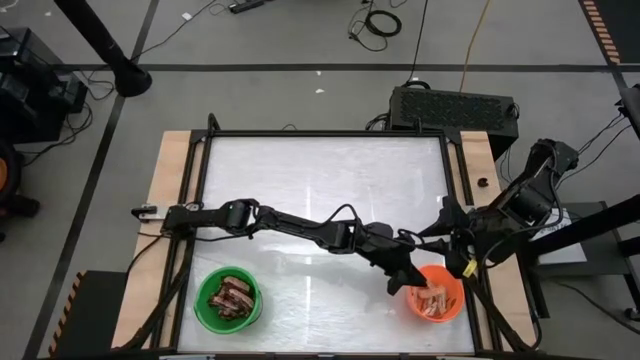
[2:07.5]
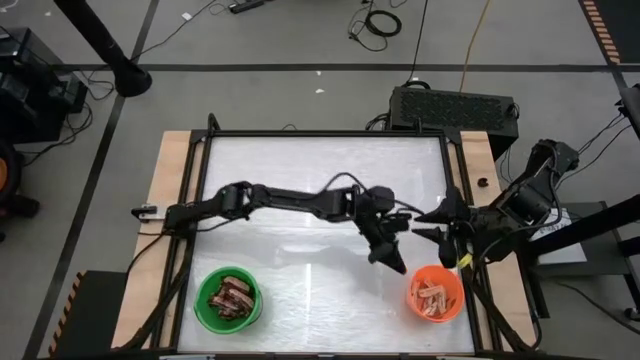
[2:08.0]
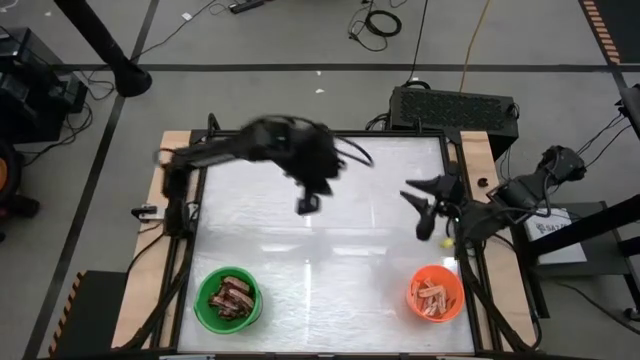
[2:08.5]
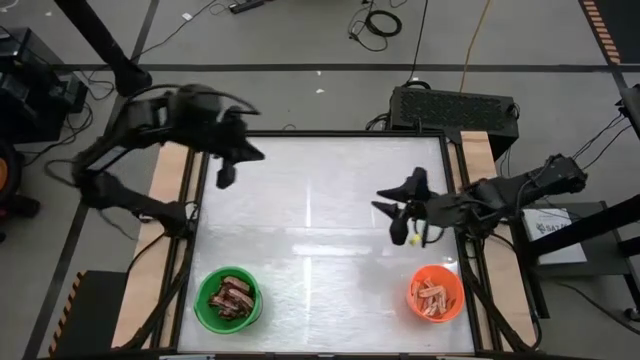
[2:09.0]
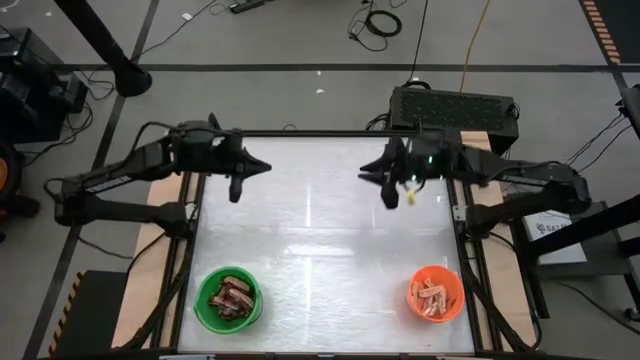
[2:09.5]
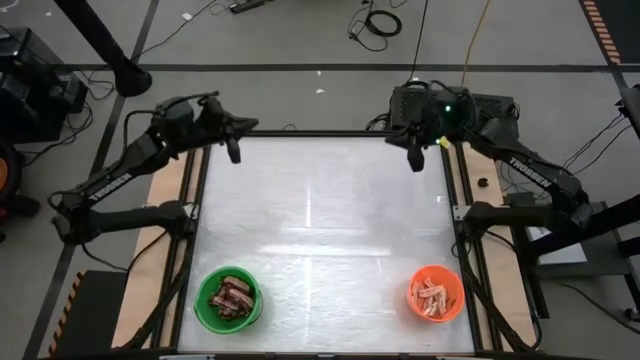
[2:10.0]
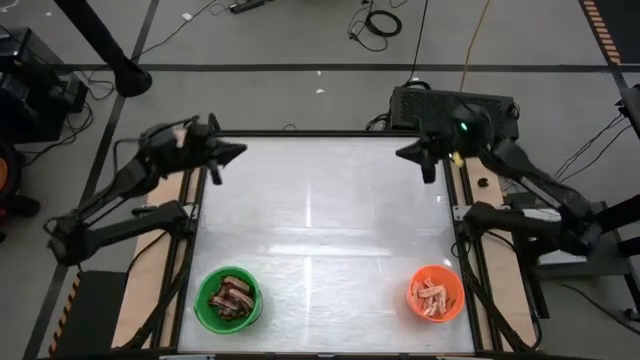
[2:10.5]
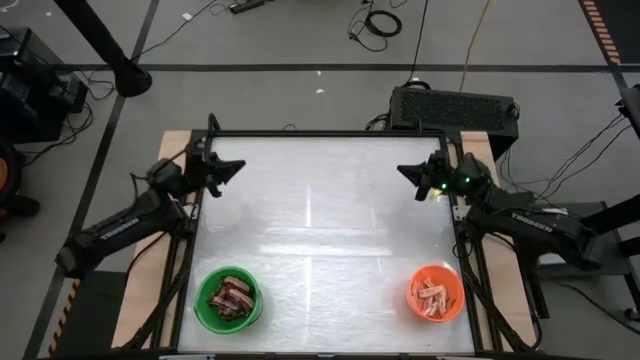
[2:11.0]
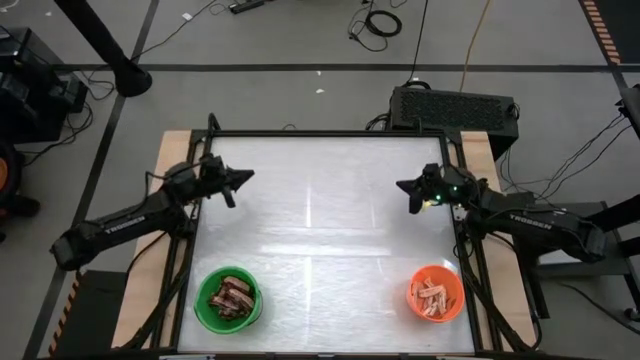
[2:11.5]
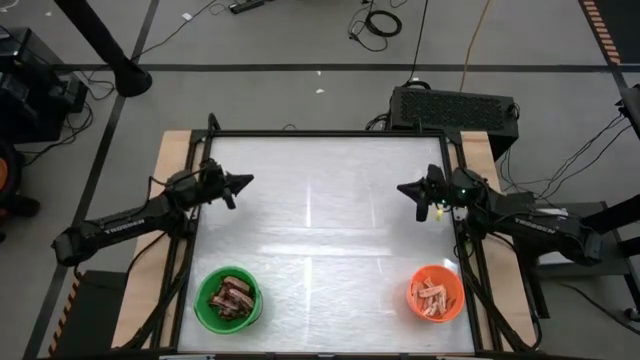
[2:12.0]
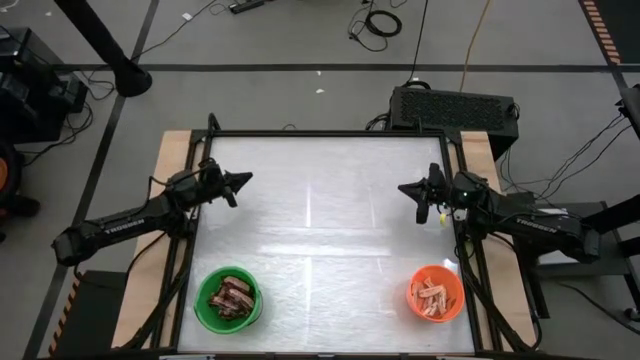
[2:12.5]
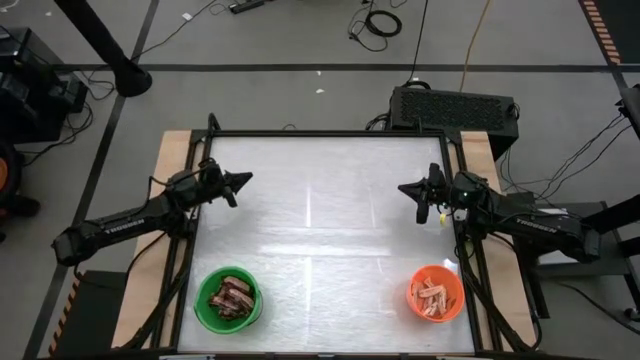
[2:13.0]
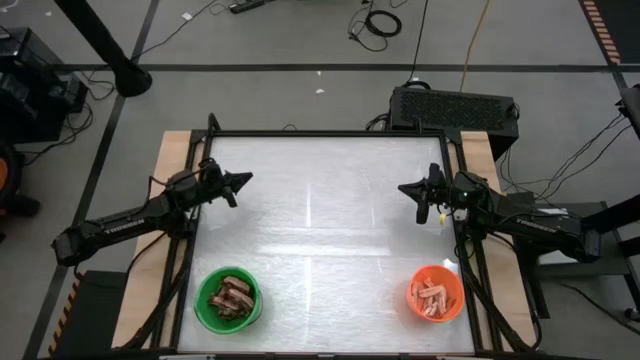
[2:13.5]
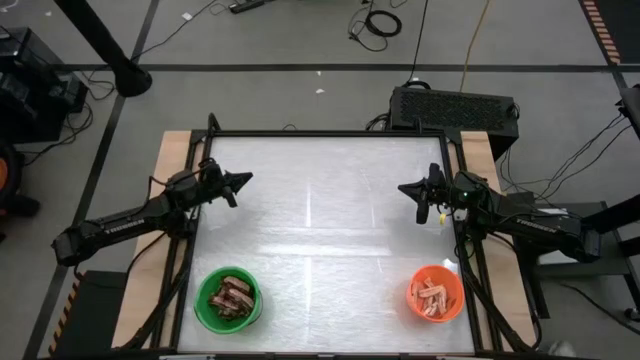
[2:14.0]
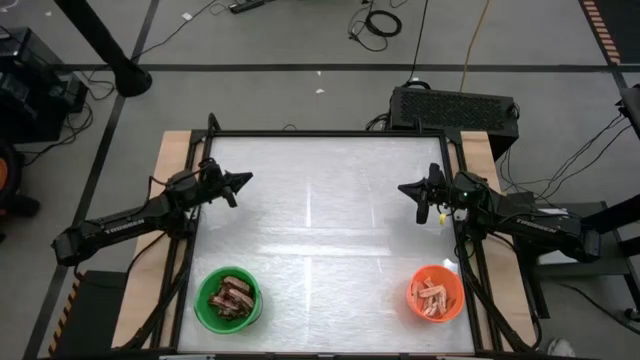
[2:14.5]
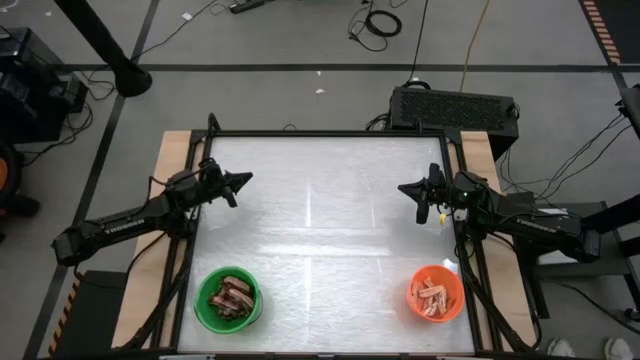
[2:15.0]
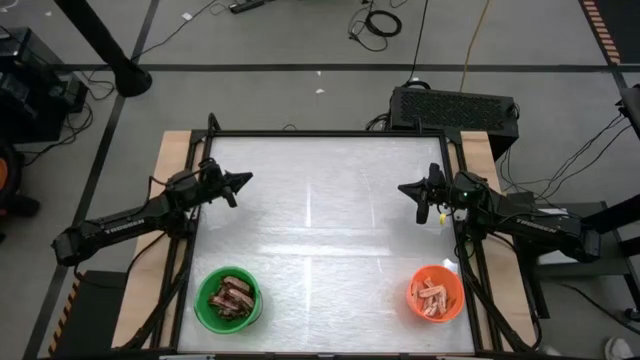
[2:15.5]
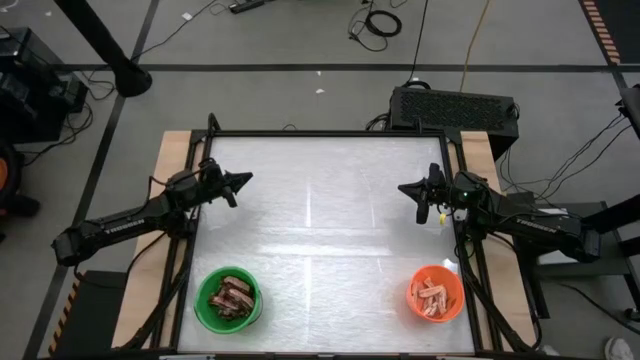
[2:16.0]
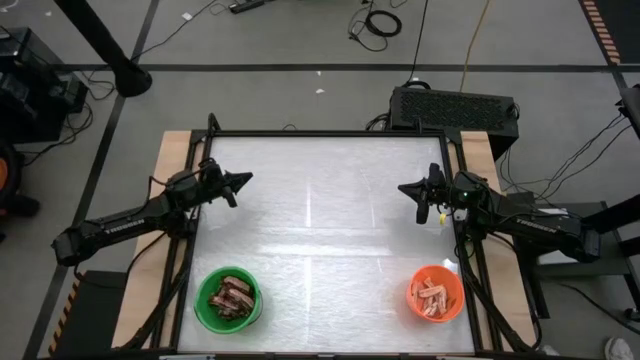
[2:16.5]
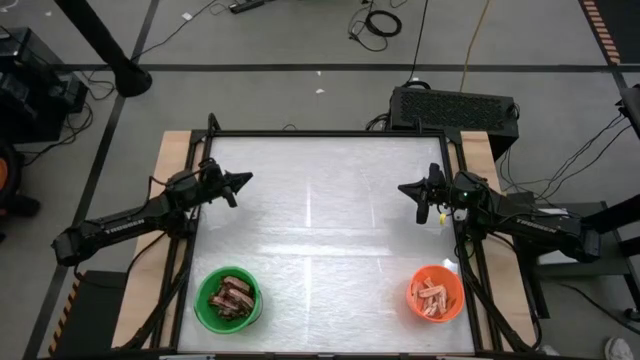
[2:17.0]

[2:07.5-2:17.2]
Task: Sort candy by brand, put in halloween buckets
Return to Home Position

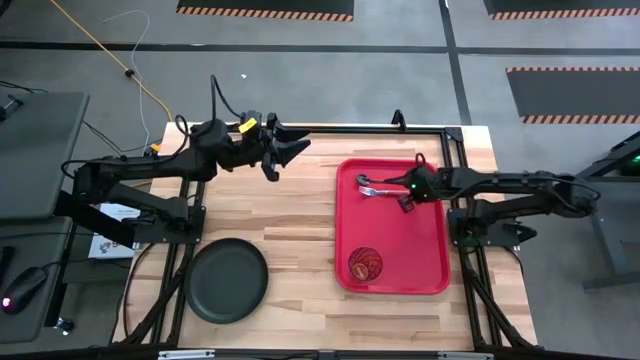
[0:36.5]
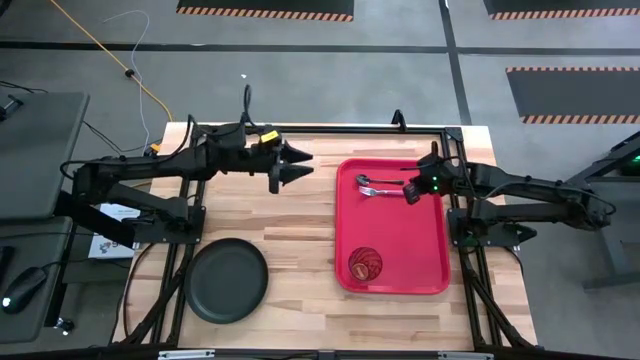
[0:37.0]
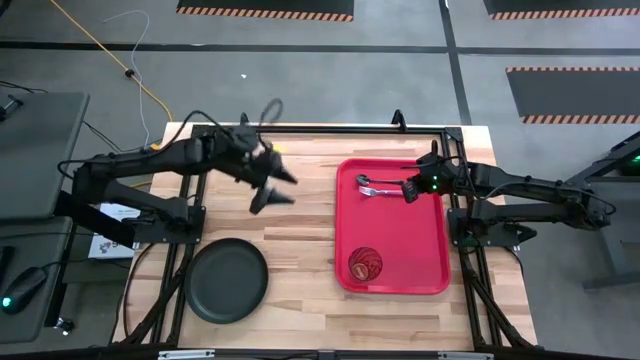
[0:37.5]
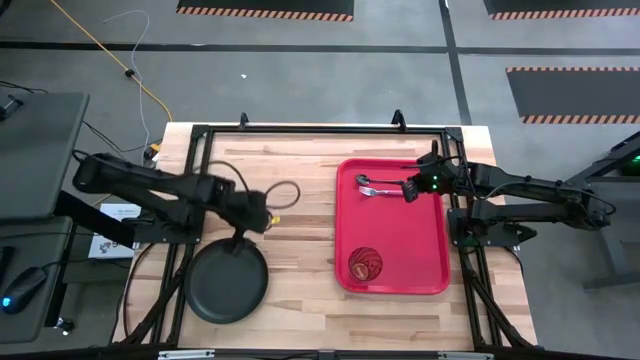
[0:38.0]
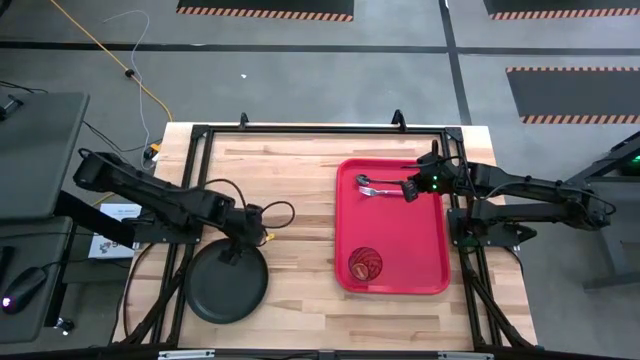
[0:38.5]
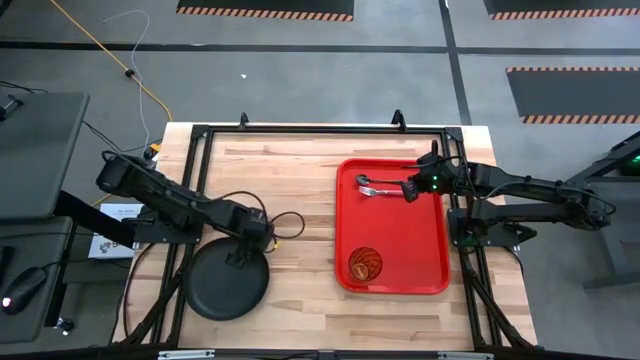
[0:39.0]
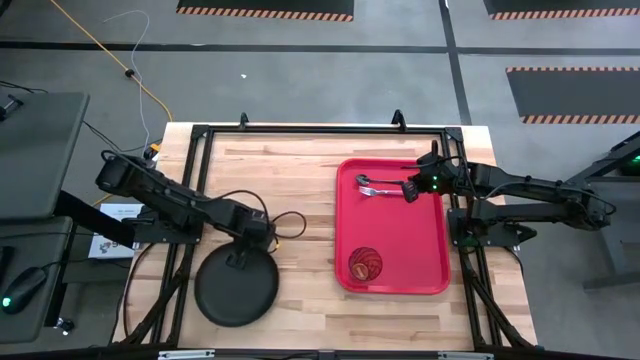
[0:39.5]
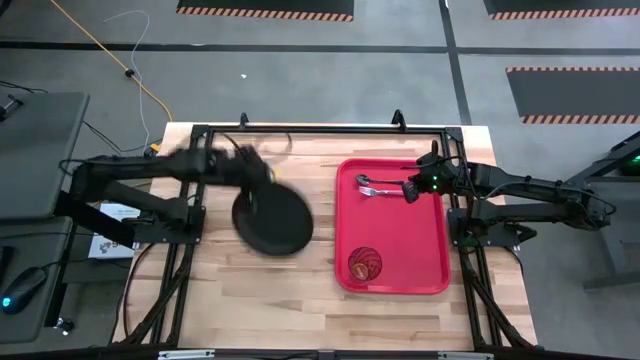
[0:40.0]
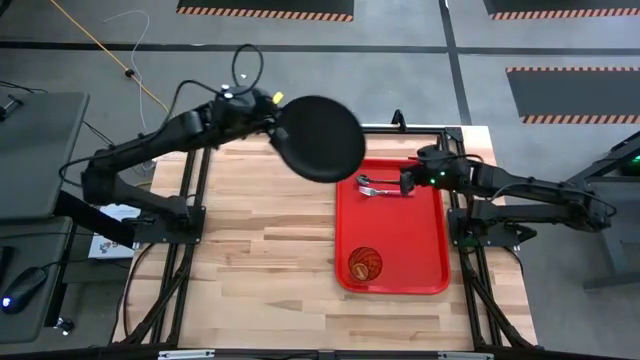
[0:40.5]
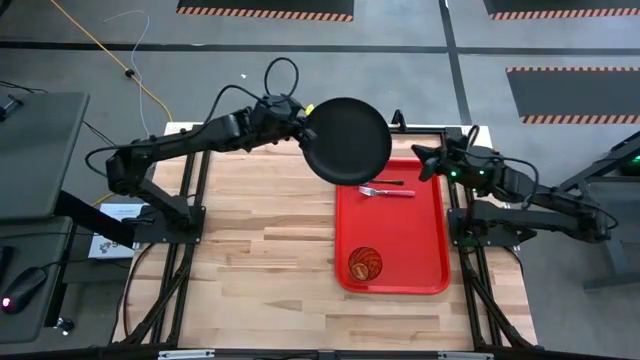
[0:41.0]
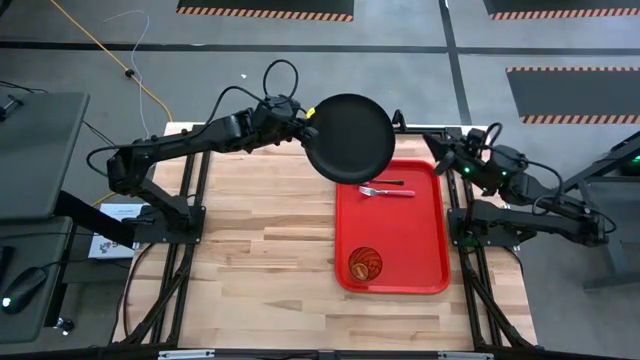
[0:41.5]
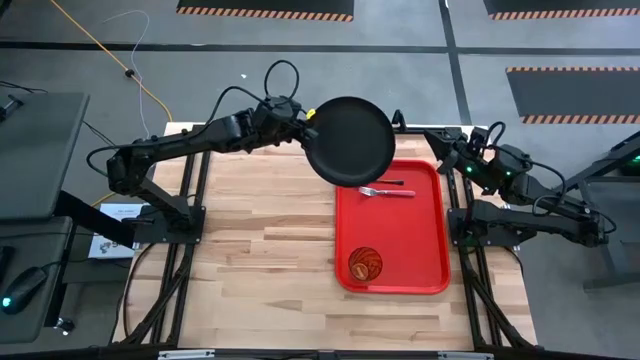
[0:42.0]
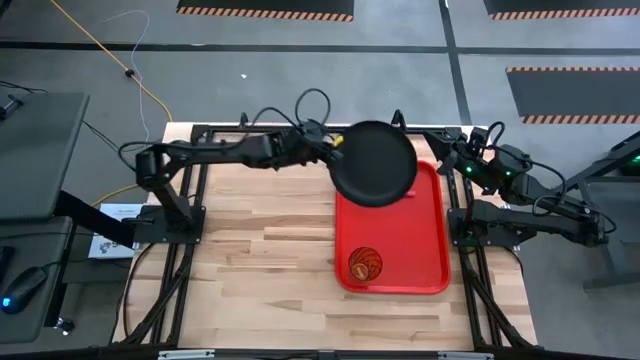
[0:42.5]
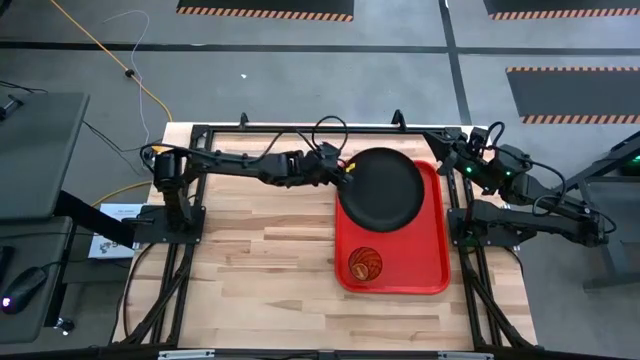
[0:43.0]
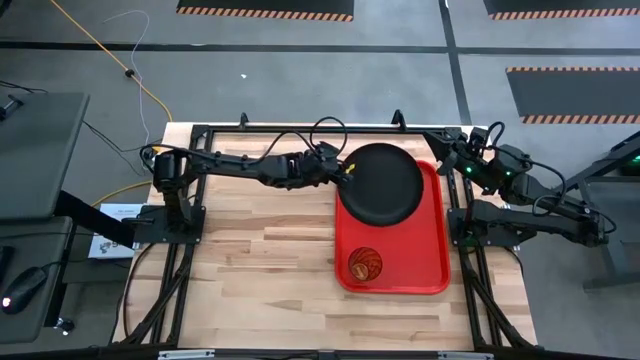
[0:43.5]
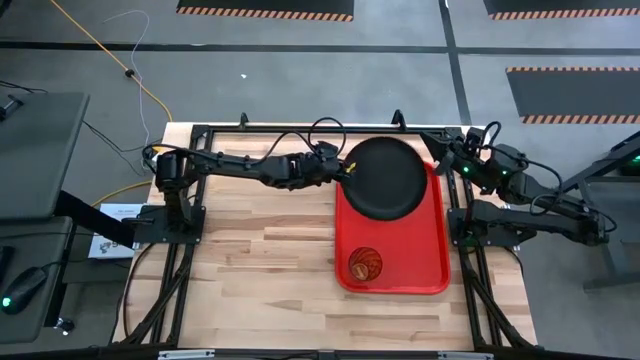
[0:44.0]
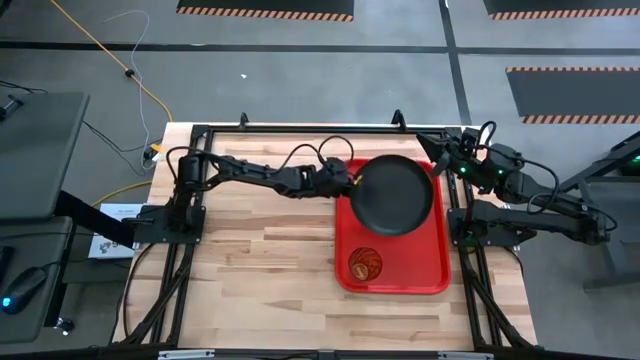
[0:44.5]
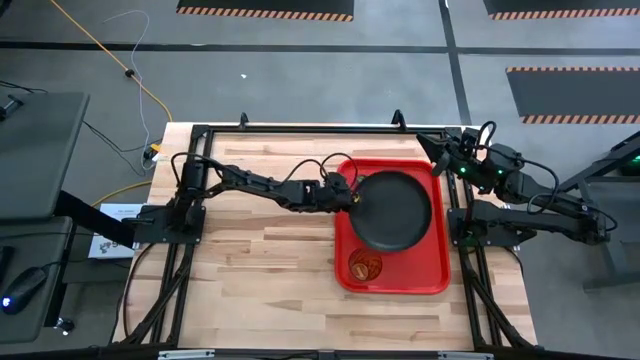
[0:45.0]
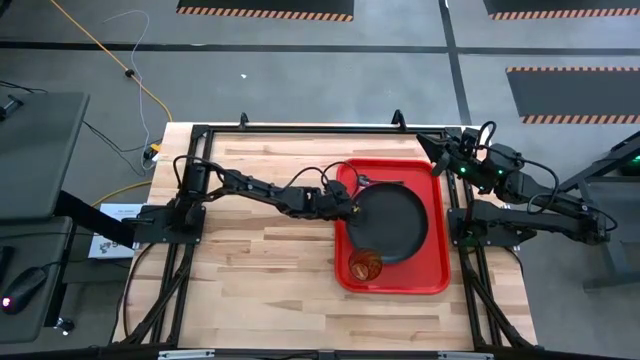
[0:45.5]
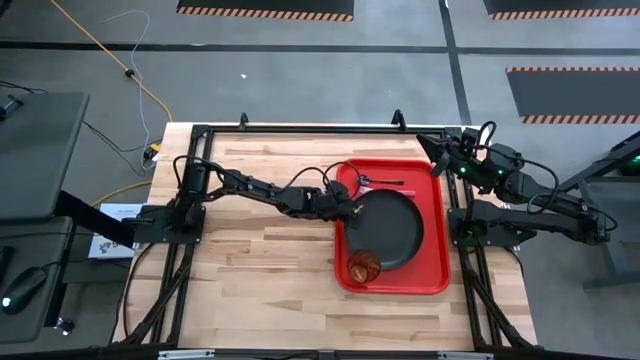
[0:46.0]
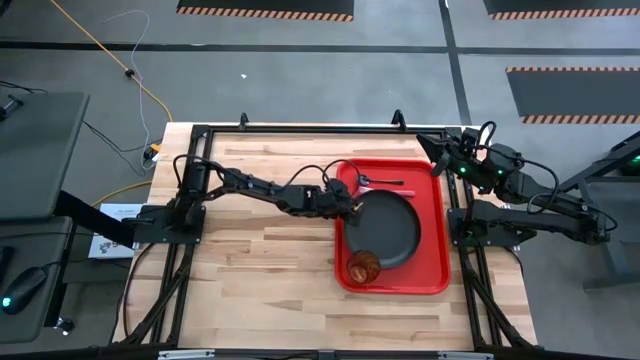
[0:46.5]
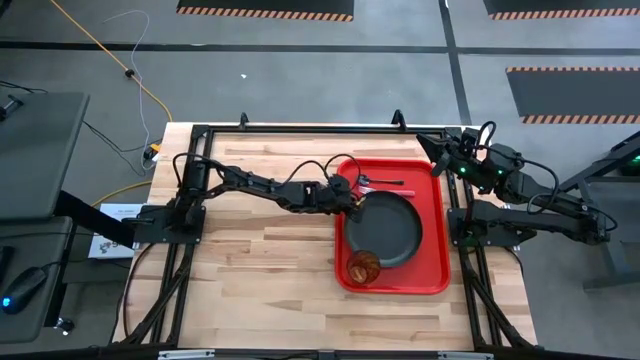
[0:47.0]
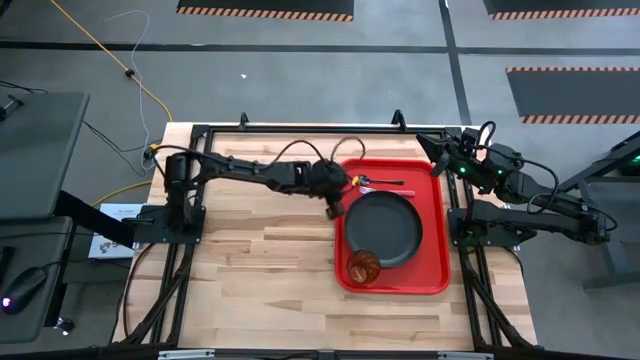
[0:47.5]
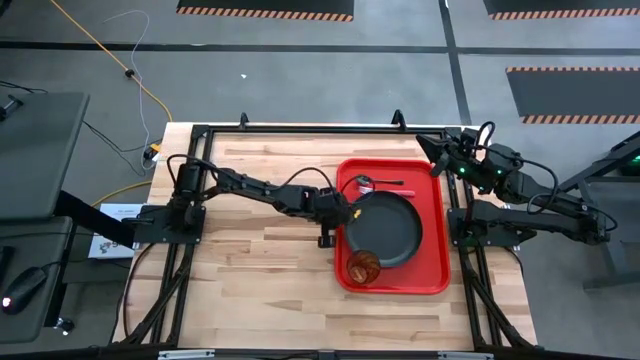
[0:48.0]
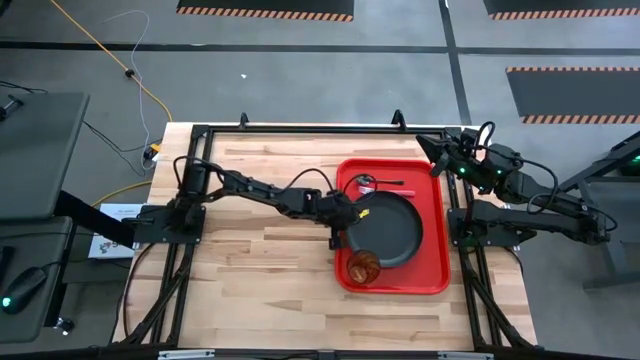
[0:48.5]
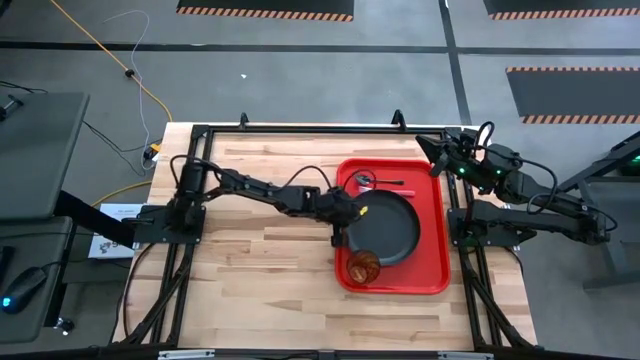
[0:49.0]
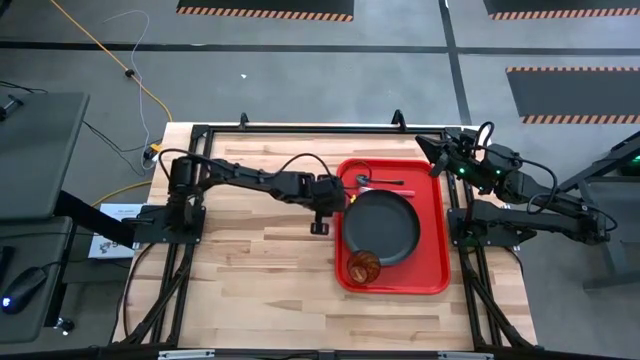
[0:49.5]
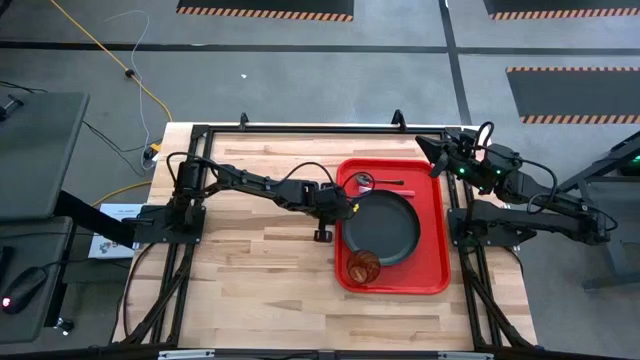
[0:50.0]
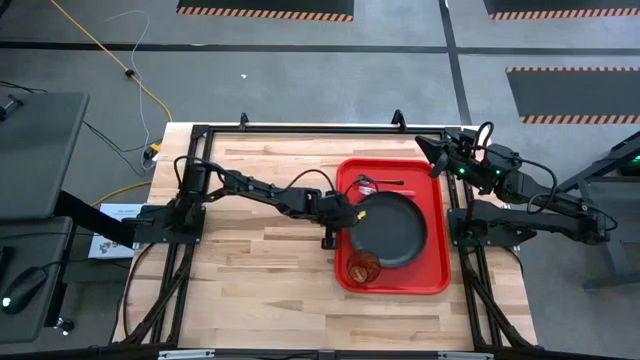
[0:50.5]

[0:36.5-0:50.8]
Task: Pick and place plate/cup/fork/spoon on tray
Put the black plate on the red serving tray to the bottom of the red fork
